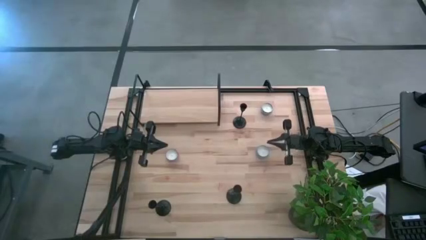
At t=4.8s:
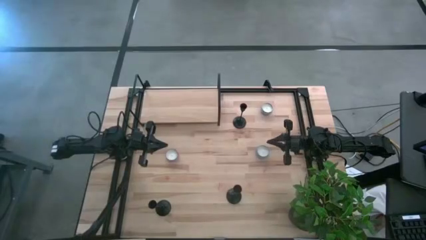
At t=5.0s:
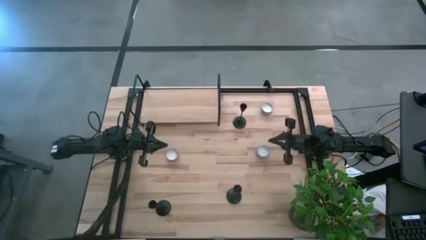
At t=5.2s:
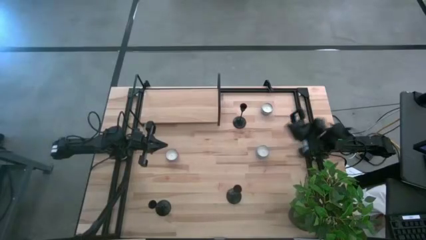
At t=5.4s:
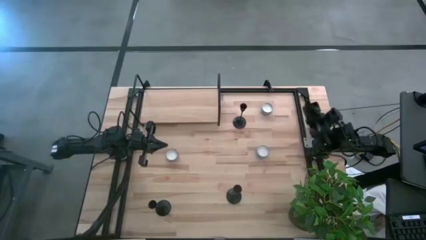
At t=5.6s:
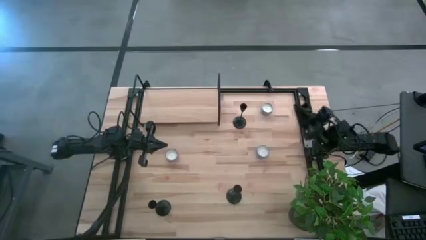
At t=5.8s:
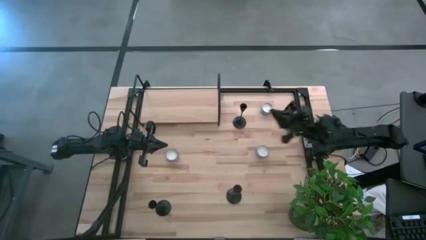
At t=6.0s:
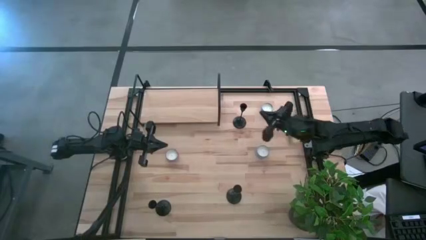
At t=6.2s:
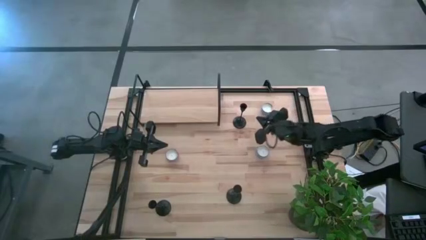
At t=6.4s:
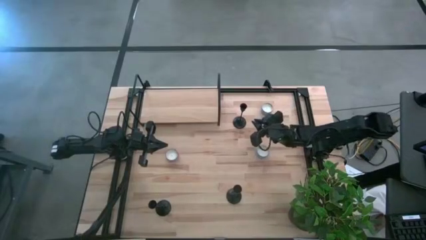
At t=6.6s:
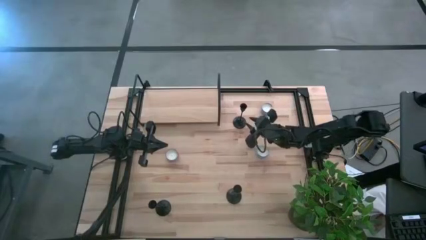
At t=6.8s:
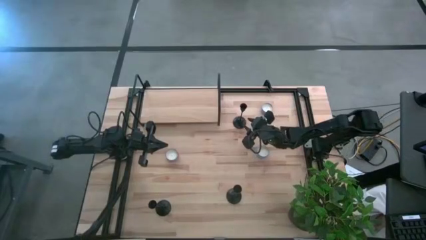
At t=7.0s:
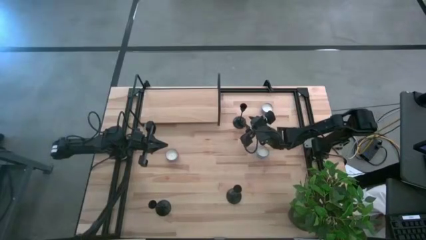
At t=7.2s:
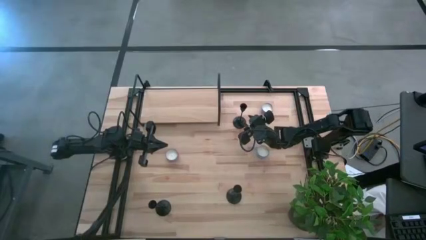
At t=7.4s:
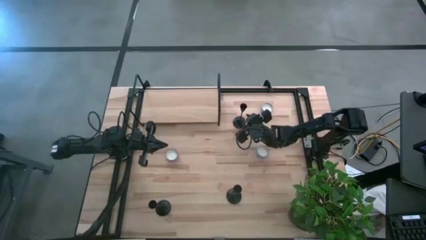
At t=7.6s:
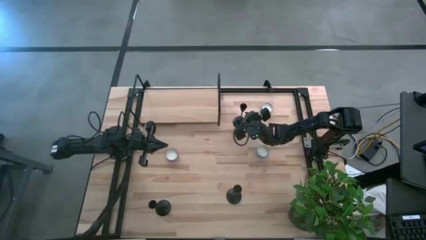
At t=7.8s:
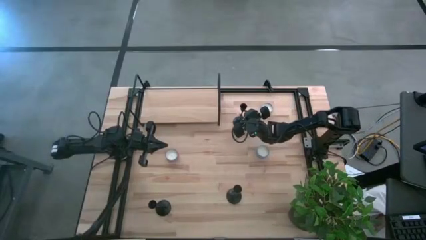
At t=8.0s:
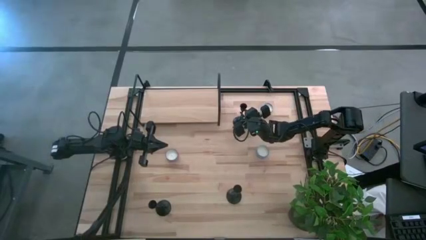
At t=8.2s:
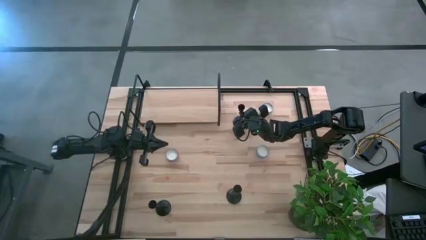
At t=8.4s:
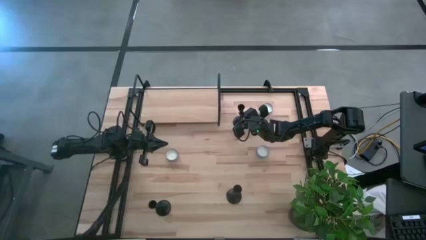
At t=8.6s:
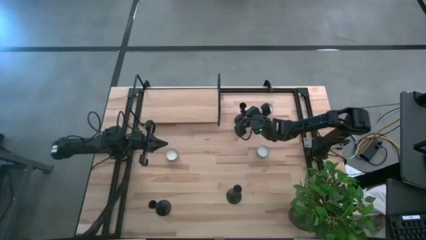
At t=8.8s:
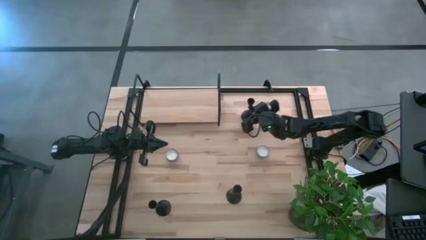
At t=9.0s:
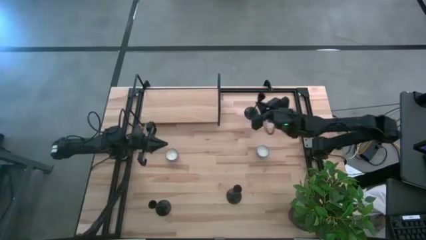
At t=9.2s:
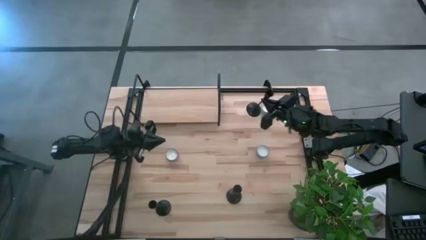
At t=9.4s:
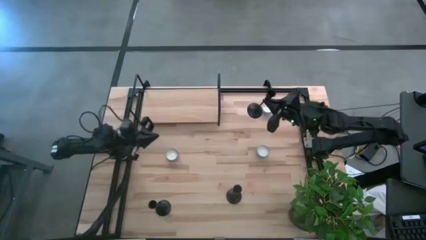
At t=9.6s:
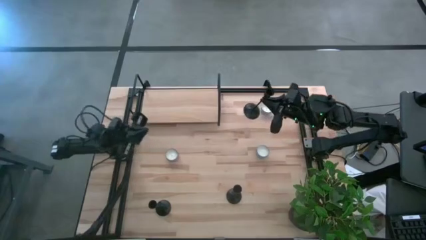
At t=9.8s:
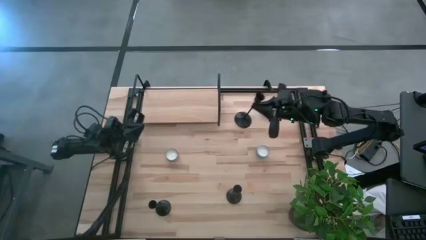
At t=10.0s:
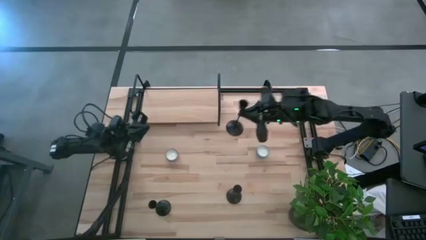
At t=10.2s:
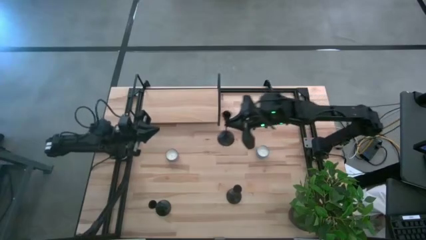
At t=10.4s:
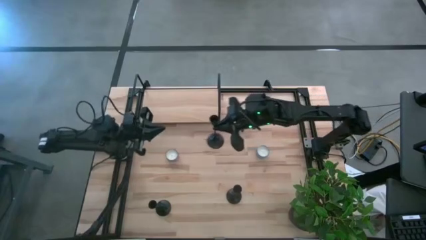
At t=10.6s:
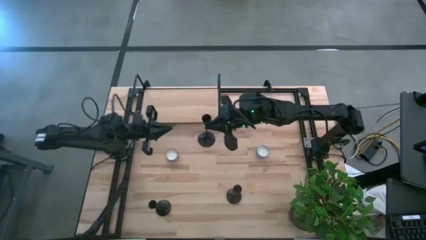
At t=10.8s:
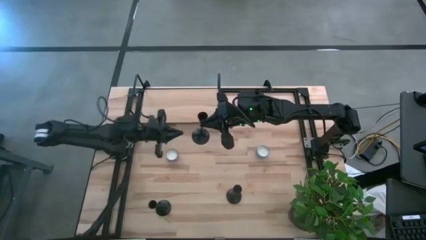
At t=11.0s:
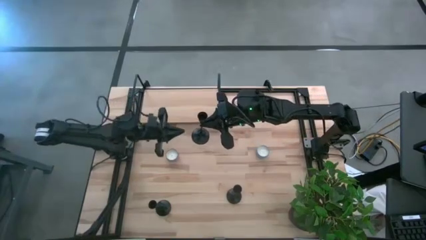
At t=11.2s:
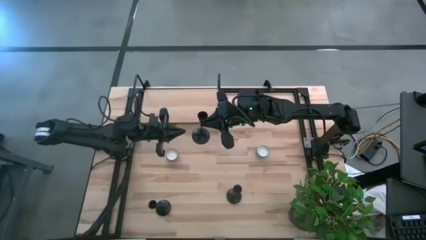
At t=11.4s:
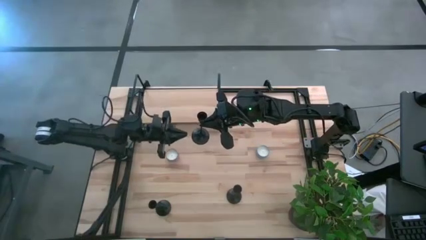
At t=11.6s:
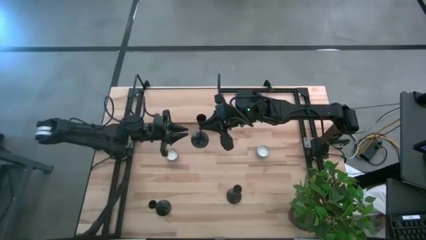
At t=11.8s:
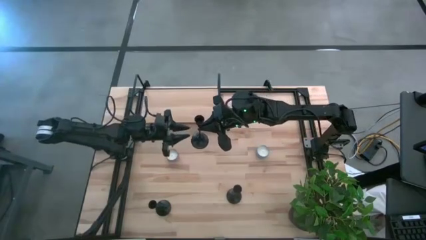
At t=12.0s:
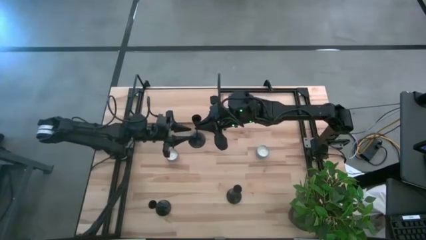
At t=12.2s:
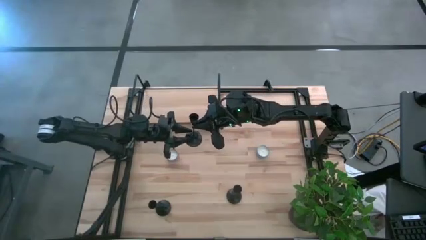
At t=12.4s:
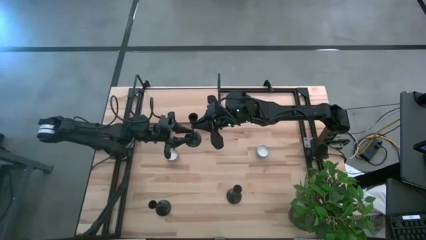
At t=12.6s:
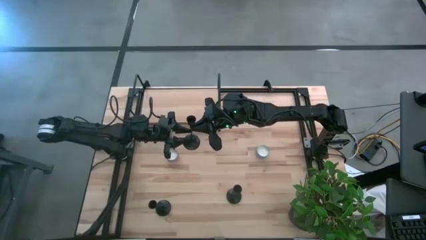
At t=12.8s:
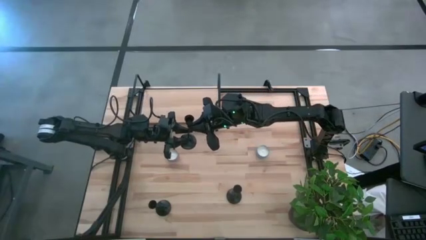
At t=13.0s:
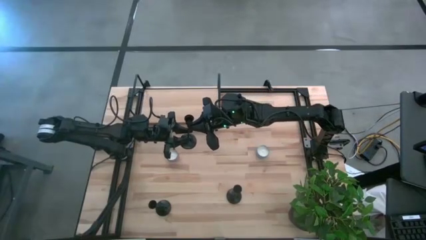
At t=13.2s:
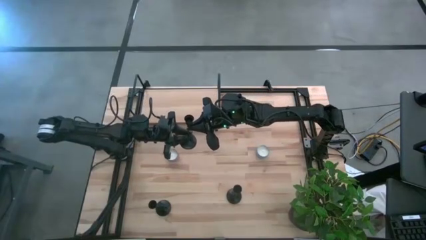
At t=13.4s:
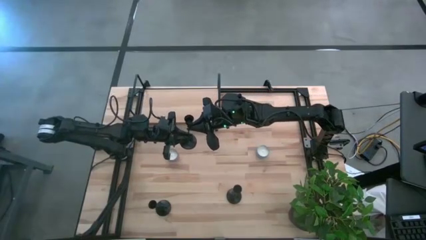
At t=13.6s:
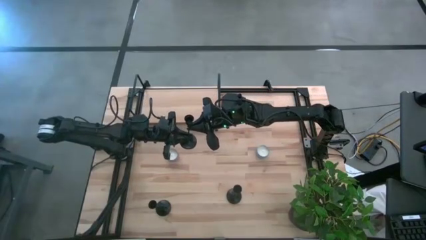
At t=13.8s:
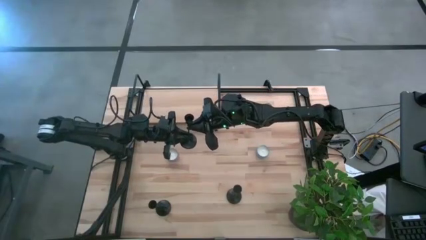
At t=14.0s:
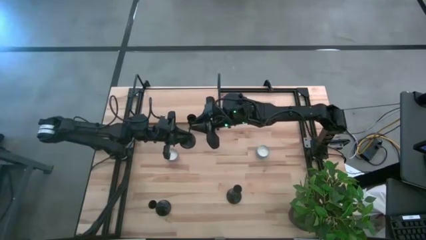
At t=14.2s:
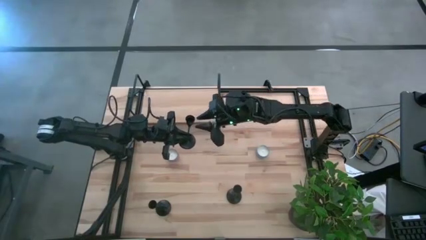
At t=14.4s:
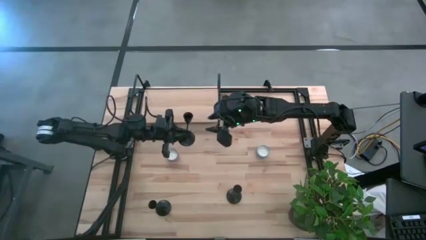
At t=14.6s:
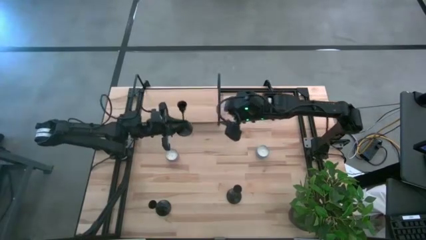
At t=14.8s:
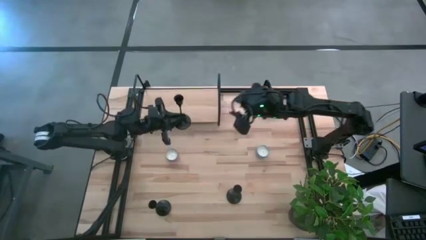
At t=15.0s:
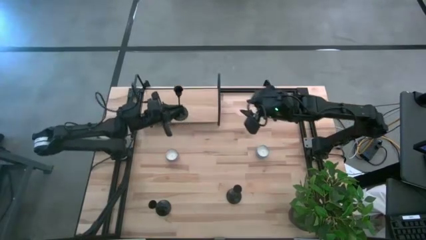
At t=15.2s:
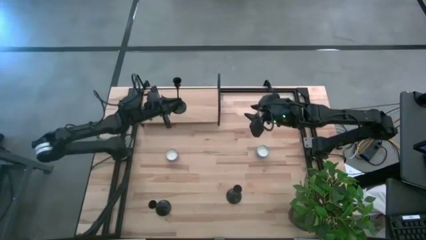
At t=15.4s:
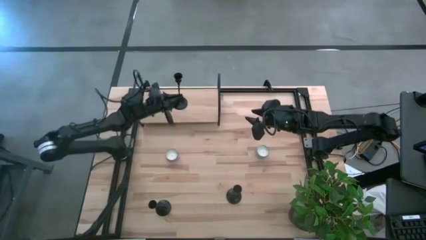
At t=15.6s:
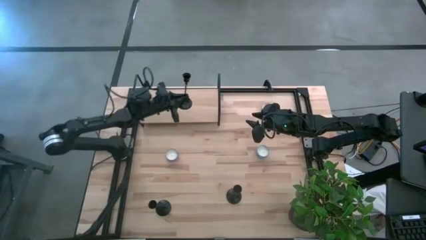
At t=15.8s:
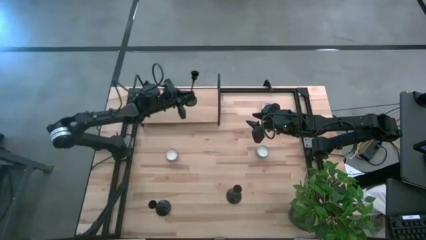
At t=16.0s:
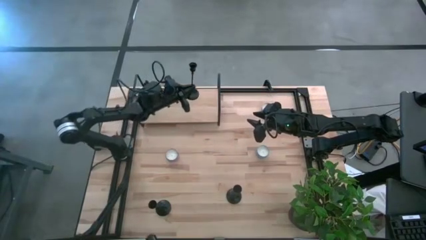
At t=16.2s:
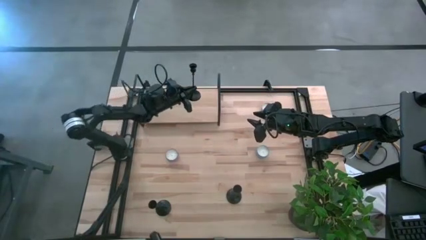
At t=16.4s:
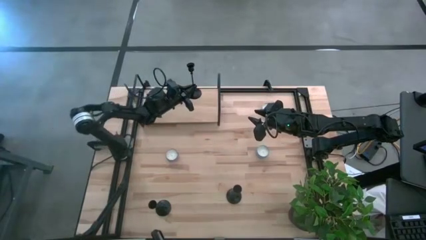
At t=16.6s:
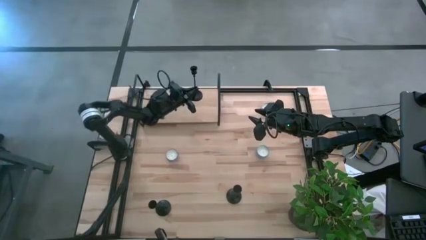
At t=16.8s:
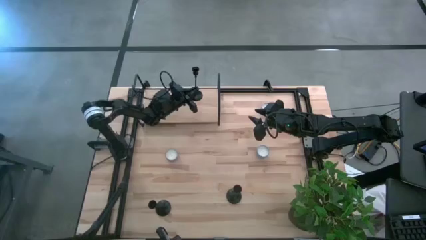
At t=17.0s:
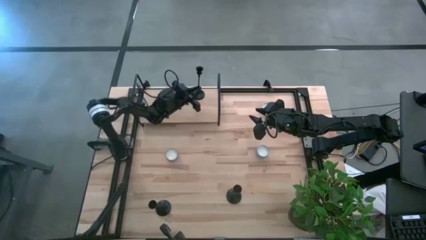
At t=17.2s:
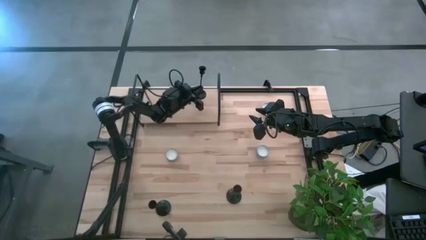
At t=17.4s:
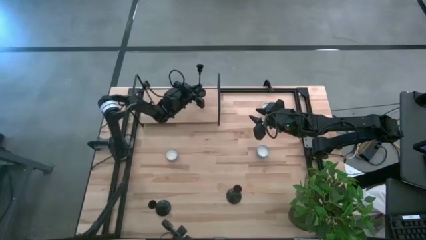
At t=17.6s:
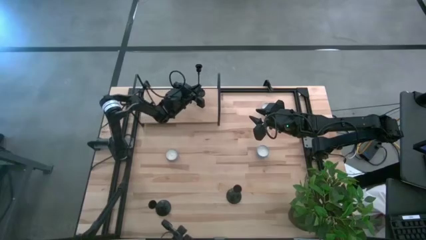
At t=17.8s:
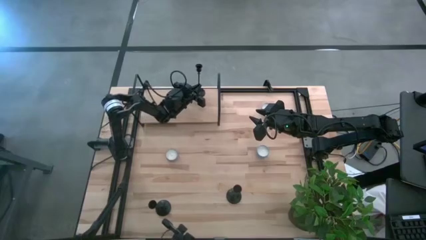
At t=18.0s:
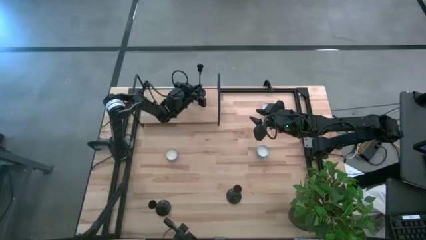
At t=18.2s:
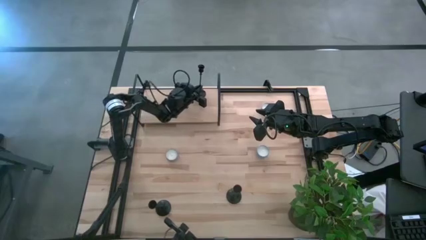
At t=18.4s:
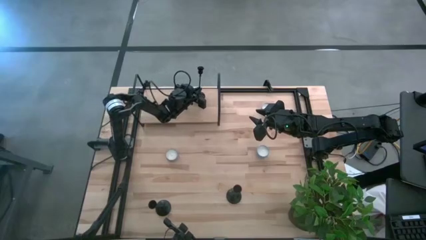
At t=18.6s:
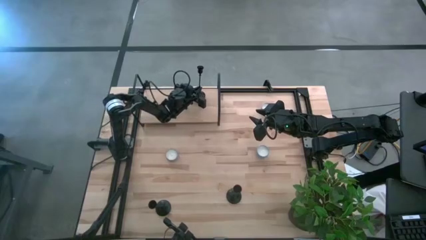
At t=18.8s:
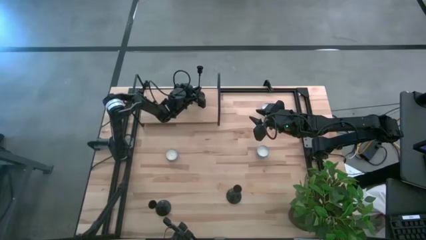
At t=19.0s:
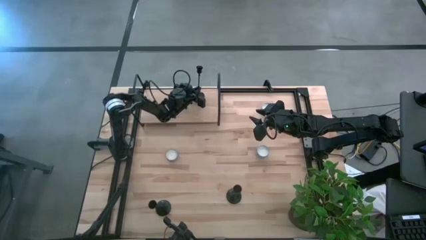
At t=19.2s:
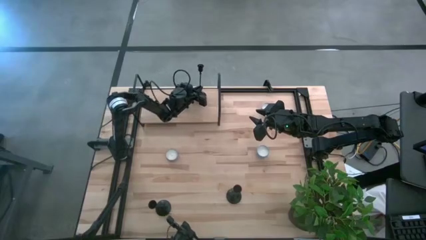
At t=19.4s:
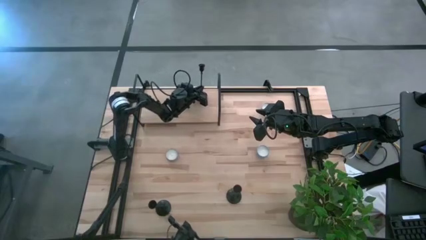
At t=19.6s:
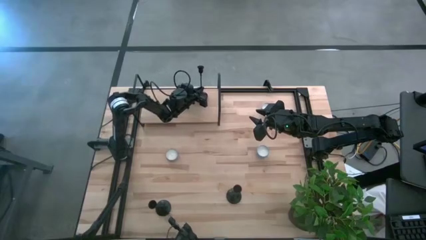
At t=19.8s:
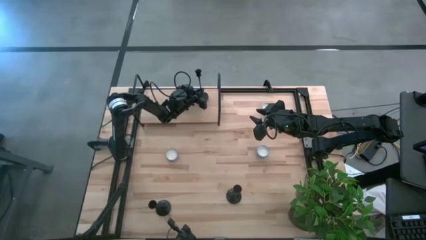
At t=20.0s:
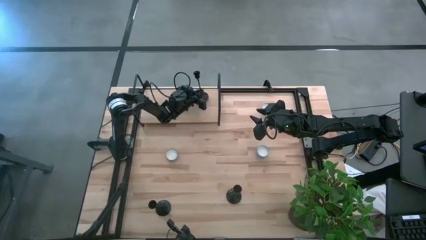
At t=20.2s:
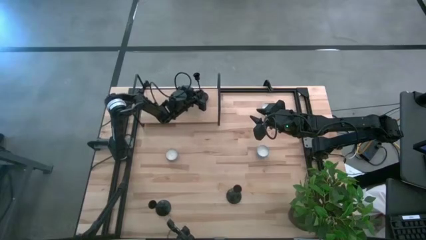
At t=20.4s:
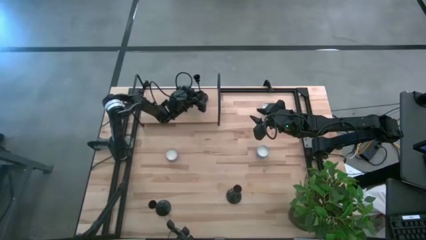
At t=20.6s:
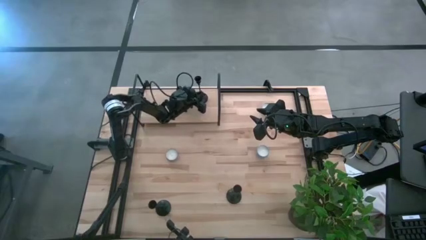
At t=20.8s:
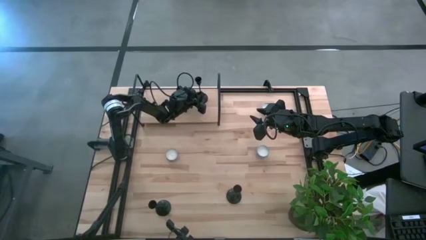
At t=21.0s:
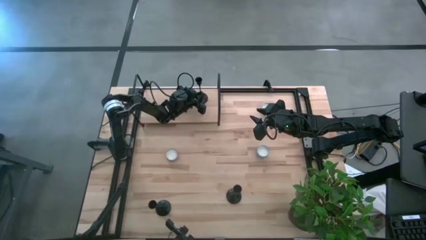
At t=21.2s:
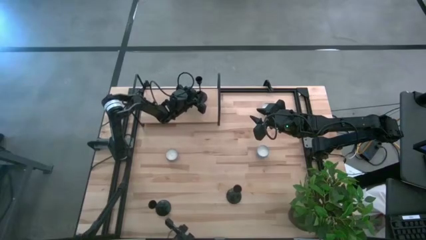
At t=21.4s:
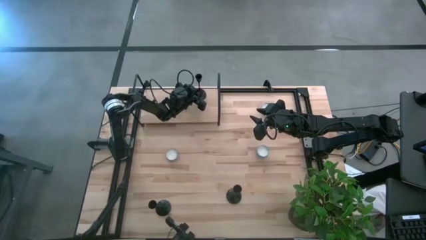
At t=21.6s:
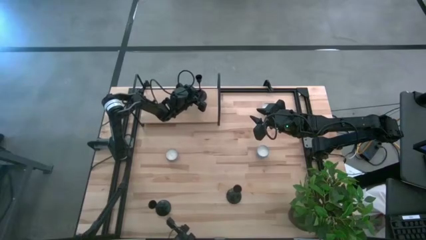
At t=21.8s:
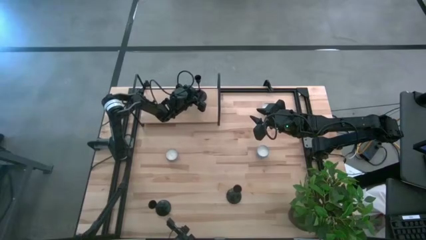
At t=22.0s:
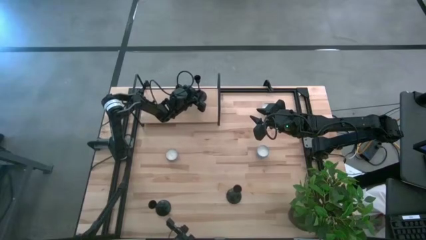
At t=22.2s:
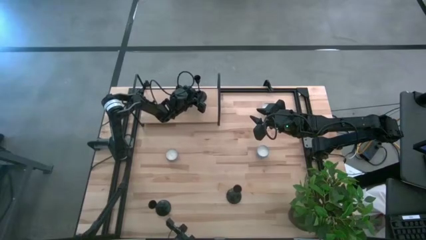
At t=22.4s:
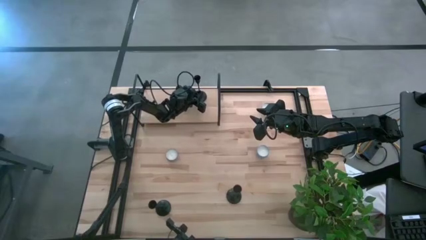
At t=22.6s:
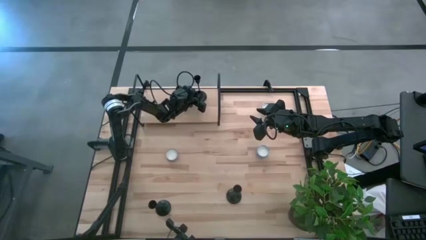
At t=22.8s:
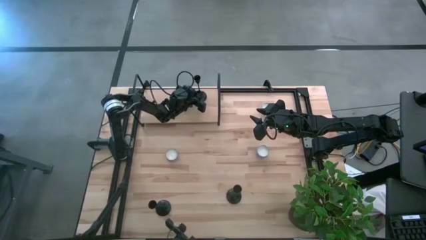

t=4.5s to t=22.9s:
Task: Pick & Place candle stick holders
Put the top black candle holder on the shelf
